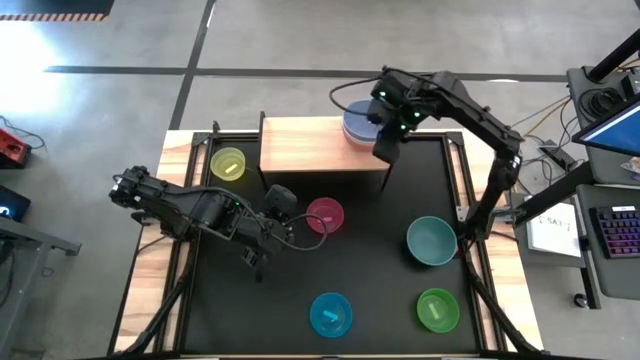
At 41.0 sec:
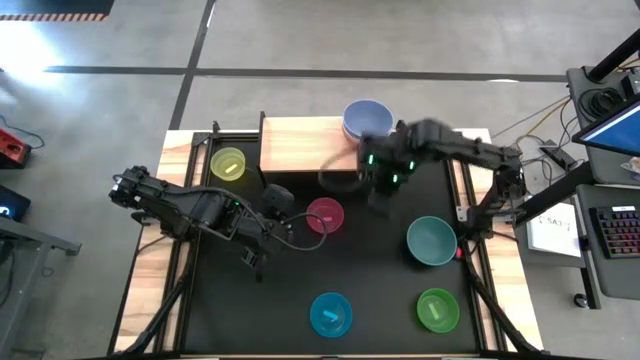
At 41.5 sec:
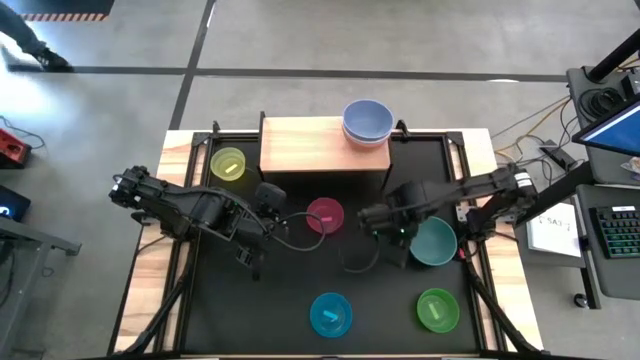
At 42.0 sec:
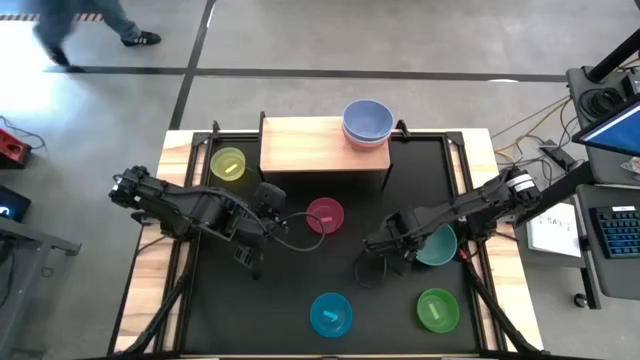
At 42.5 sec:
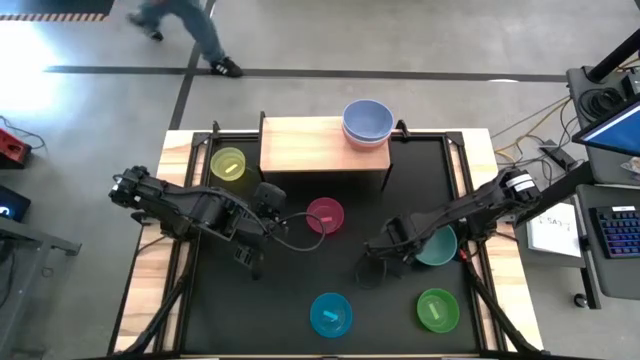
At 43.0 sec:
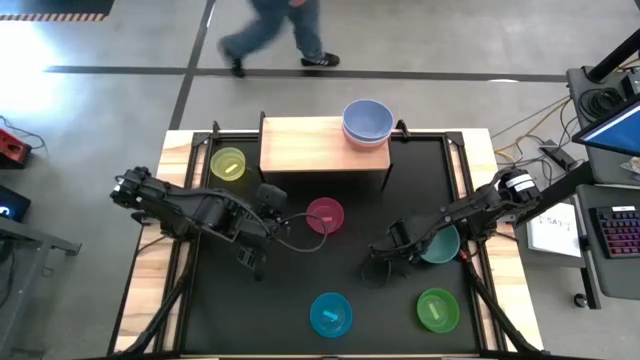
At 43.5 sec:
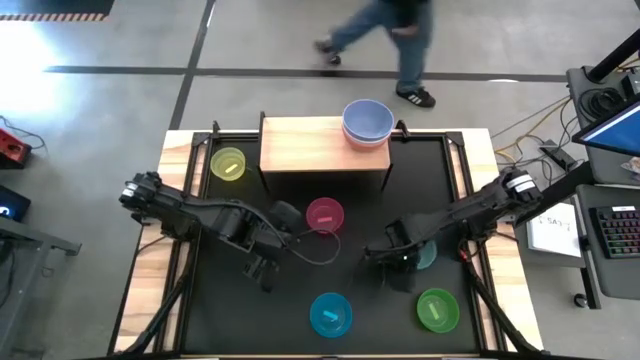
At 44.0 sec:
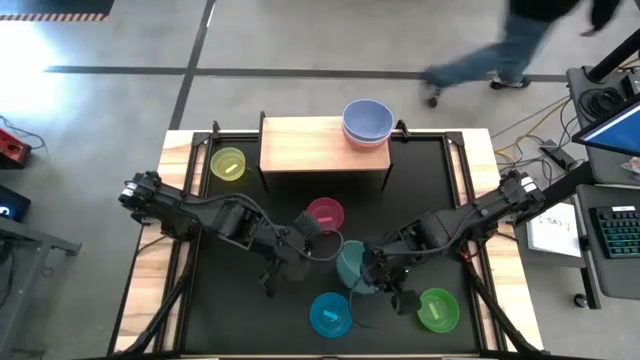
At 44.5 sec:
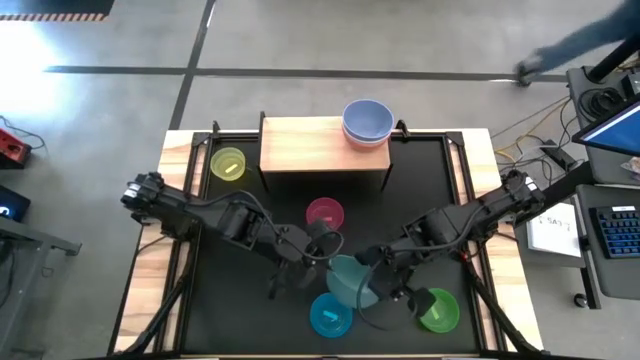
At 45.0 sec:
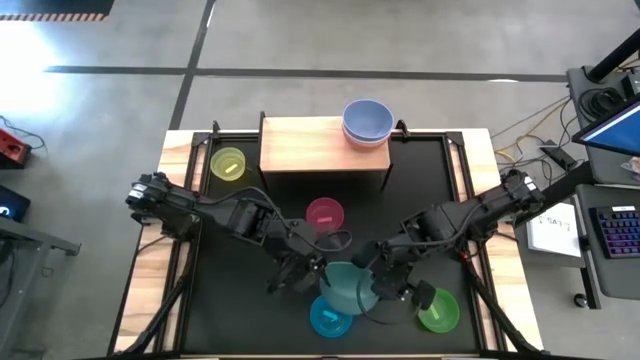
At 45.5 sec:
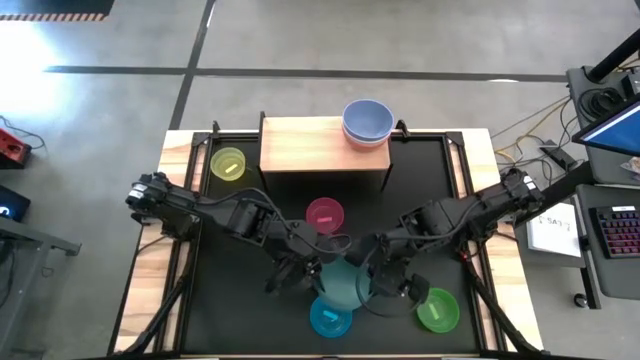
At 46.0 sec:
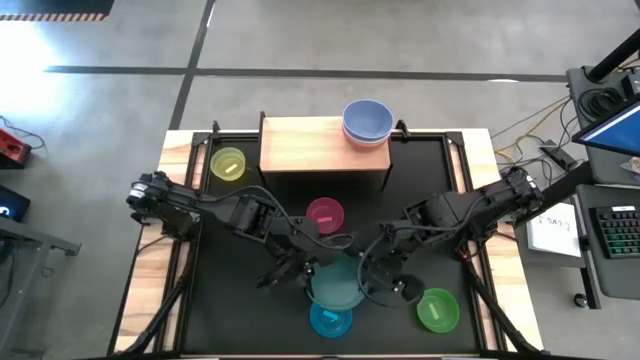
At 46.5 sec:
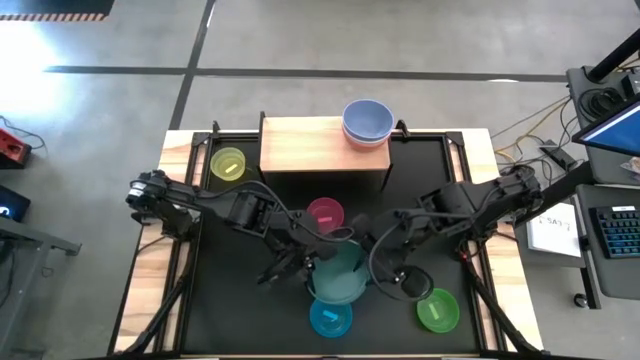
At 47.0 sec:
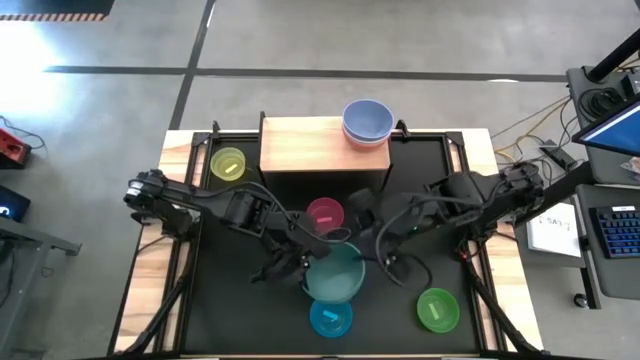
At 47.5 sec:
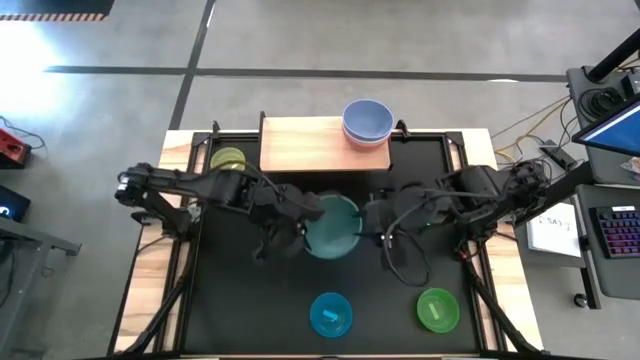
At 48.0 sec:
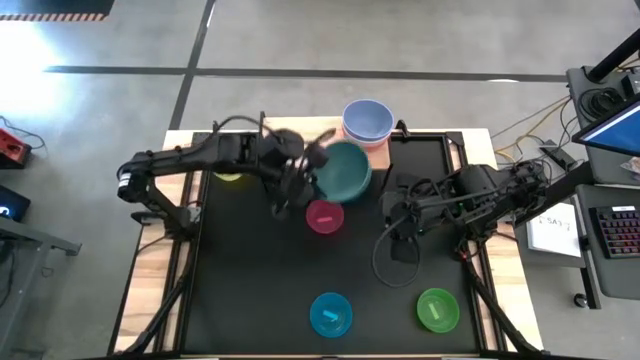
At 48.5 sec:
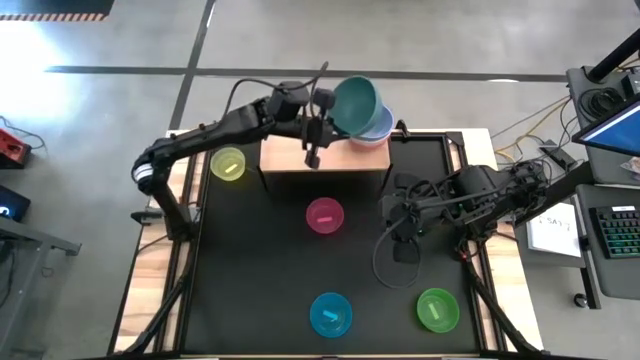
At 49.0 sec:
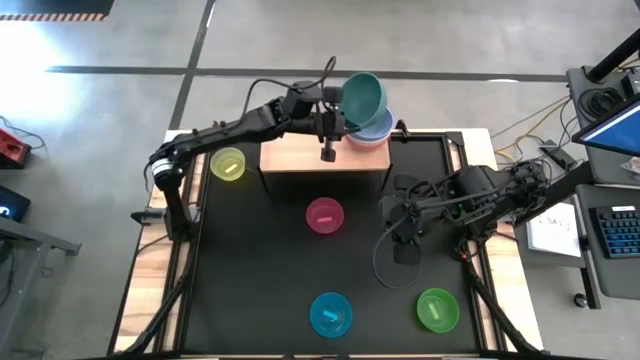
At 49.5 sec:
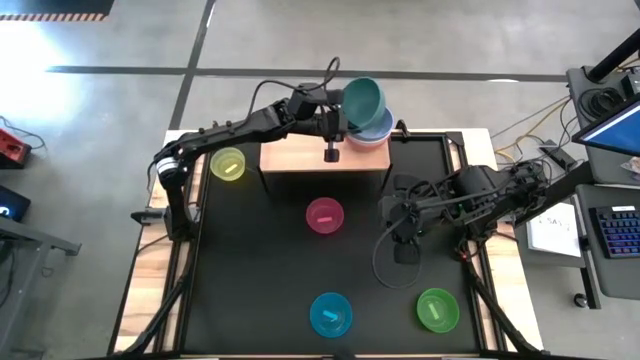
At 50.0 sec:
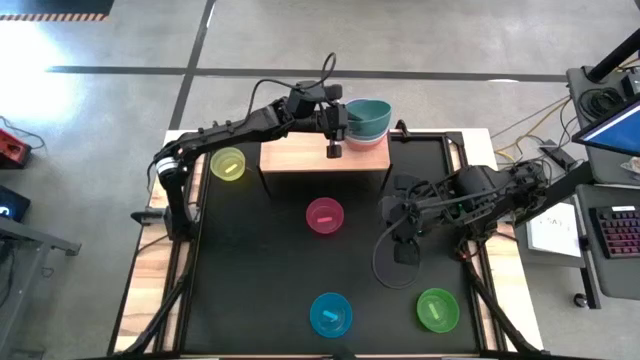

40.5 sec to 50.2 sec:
Task: Place and stack bowls onto a shelf
Stack the green bowl on top of the purple bowl

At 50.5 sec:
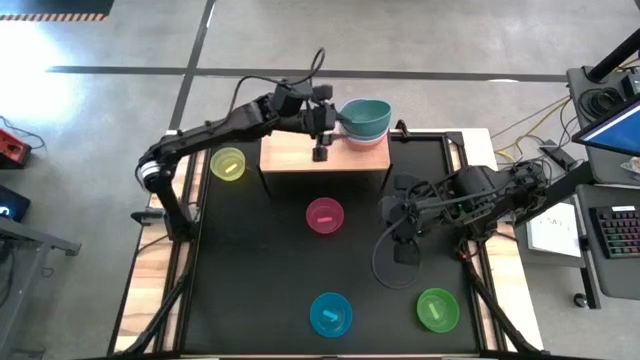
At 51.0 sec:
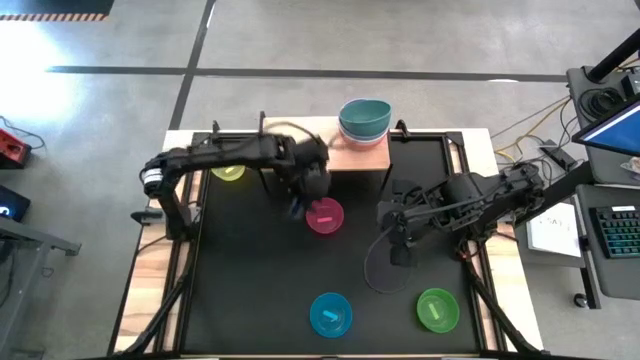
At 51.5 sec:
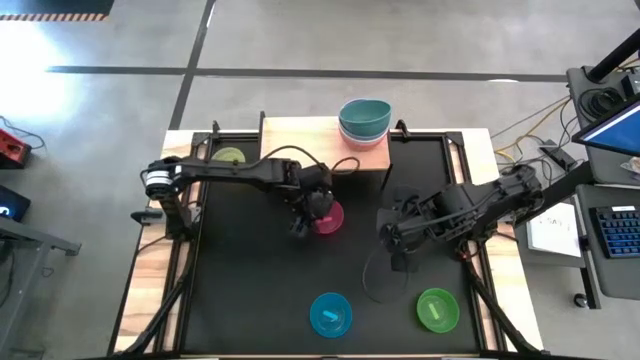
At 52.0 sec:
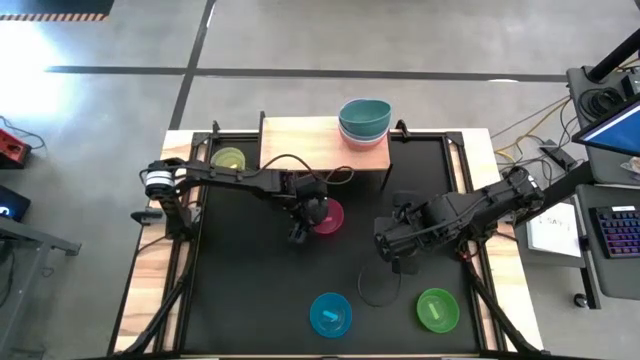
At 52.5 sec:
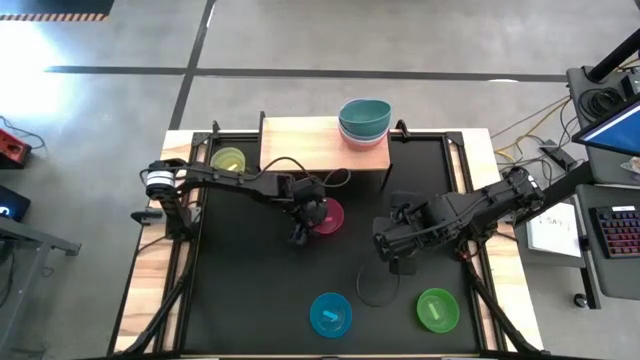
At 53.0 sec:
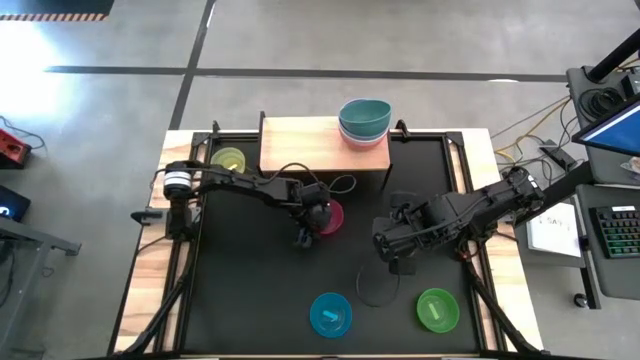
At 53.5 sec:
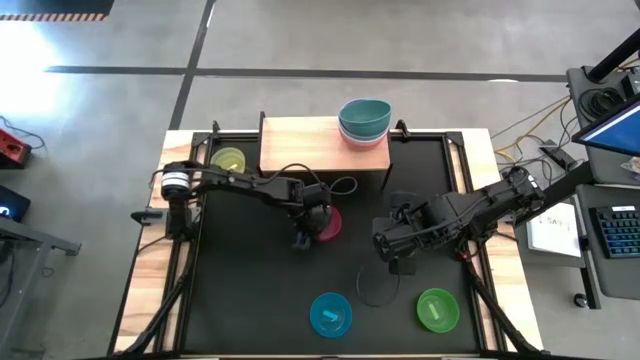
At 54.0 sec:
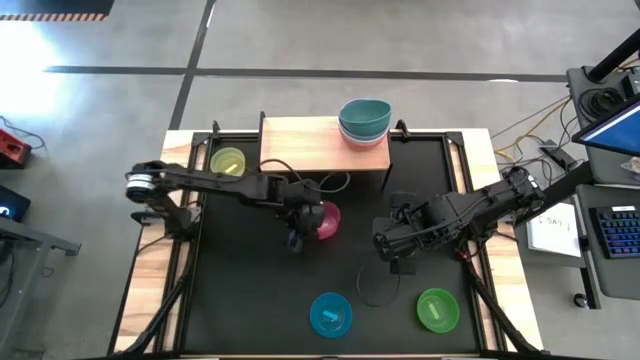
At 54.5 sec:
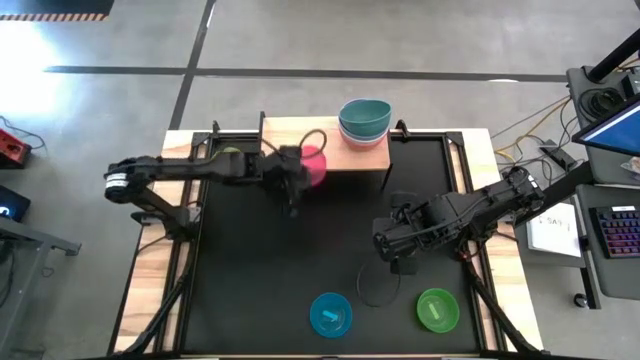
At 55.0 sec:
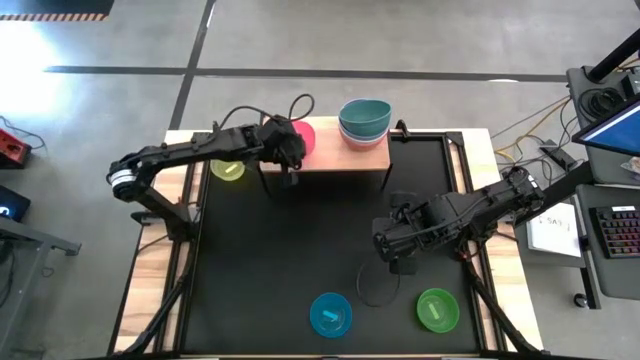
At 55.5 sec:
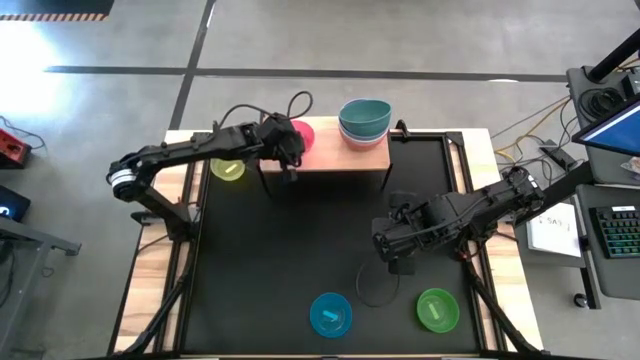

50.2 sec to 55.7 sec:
Put the pink bowl on the shelf

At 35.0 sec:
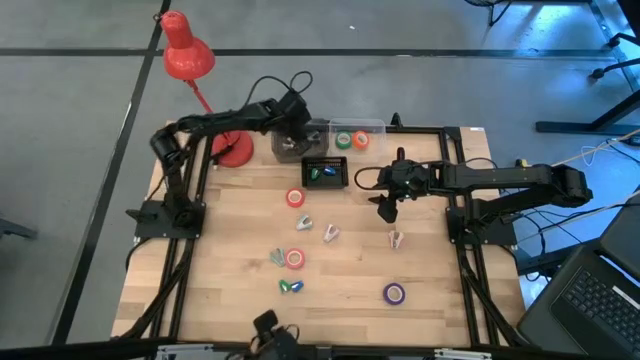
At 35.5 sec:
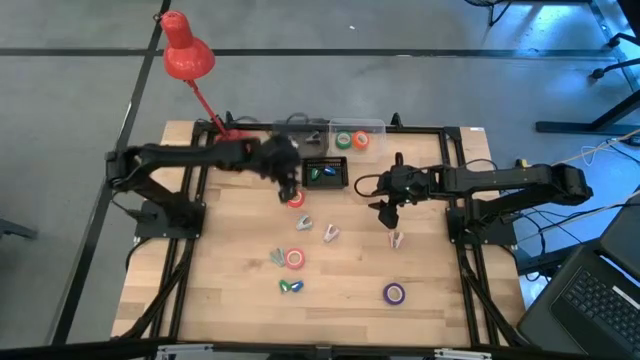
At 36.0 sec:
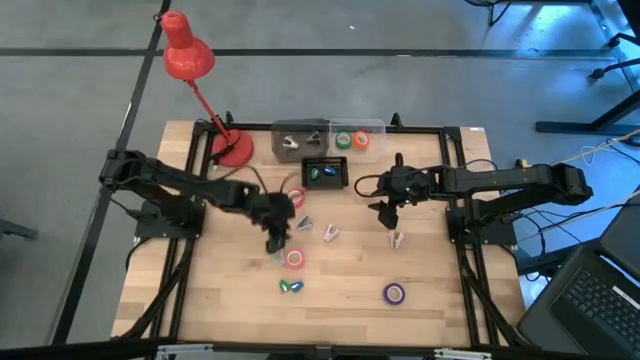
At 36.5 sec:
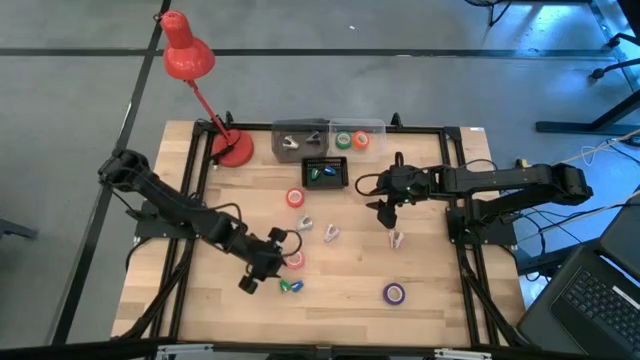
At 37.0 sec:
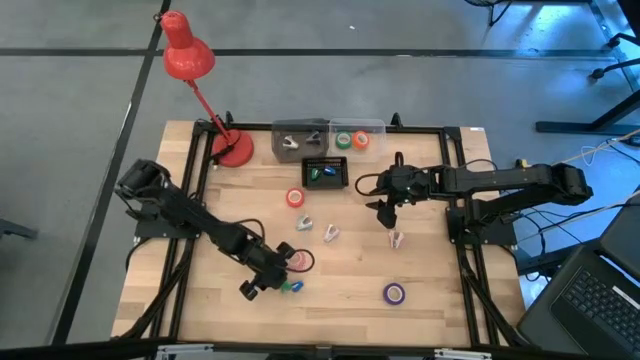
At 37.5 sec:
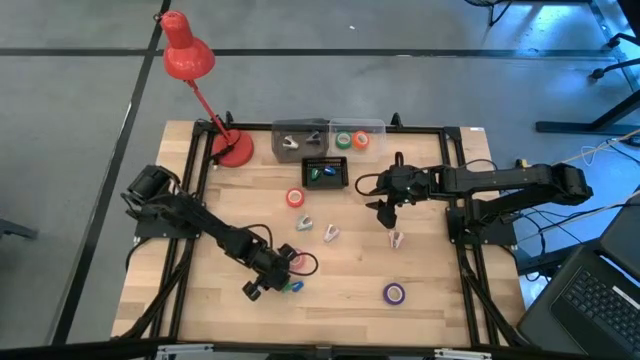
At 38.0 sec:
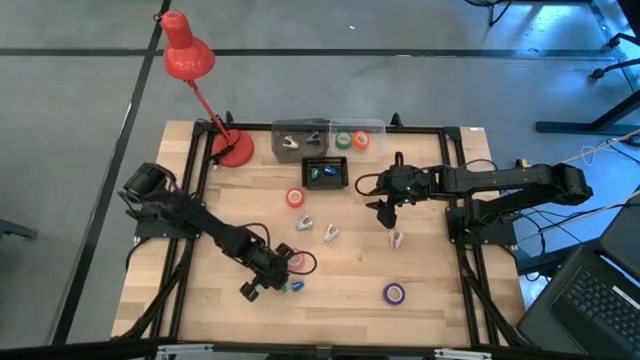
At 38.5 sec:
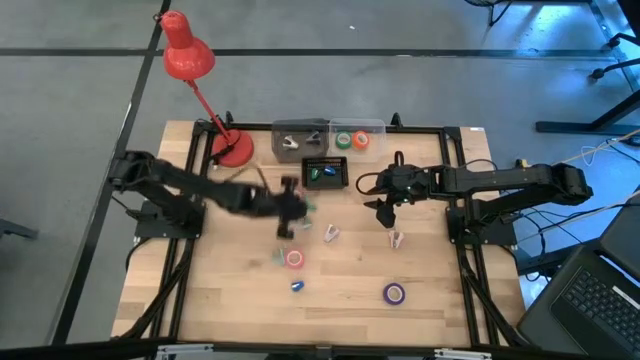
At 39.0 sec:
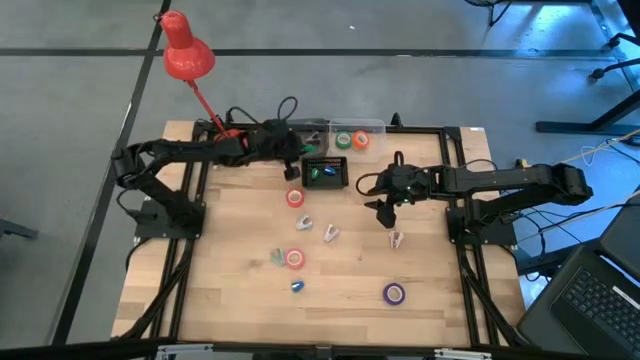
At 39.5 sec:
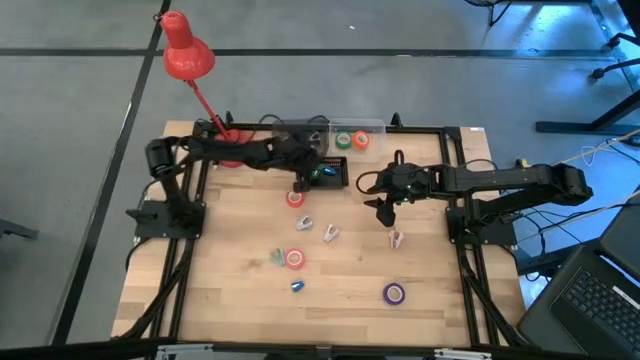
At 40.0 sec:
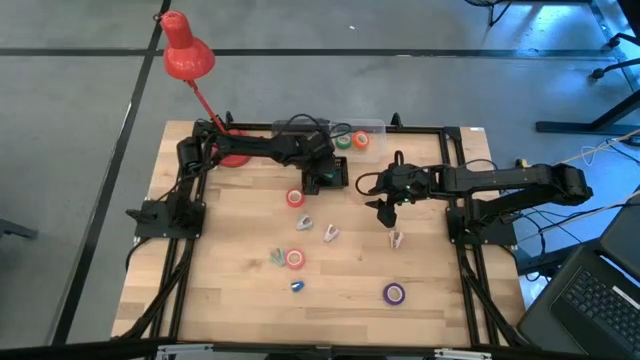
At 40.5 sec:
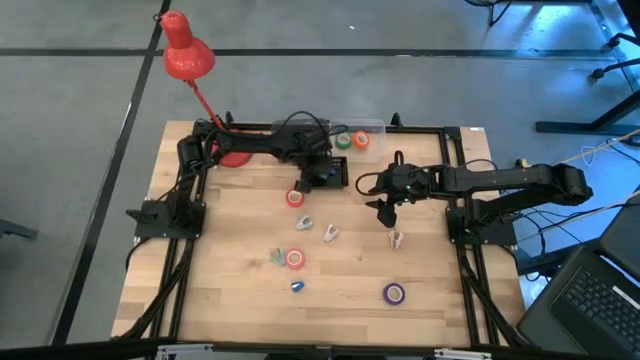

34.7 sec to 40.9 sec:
Task: Pick and place Stapler, Stapler remover, tape
Put the green stapler into the black bin
